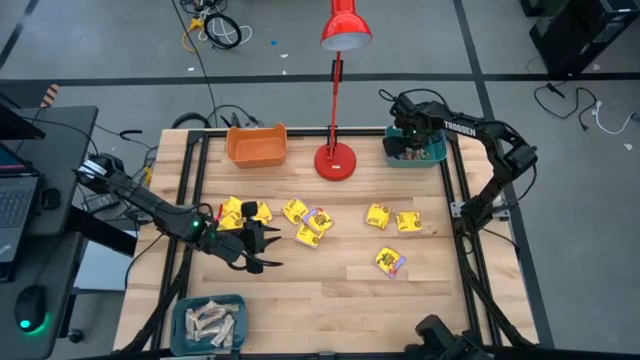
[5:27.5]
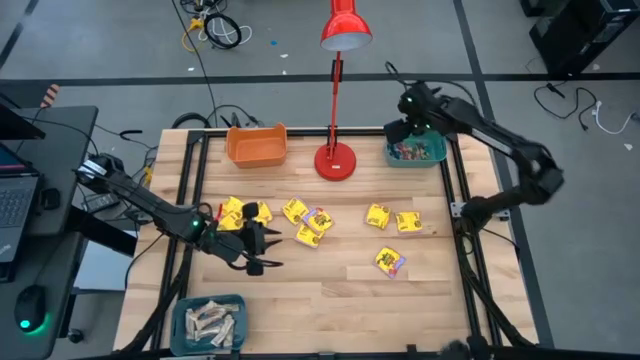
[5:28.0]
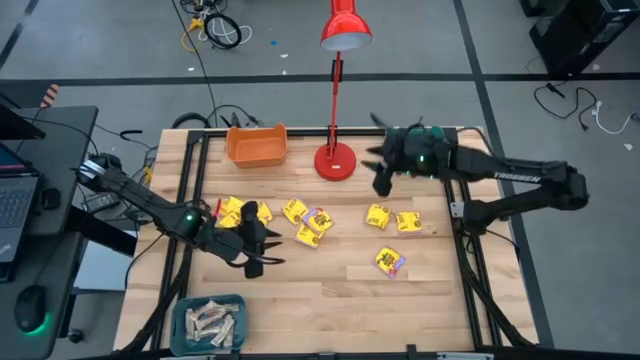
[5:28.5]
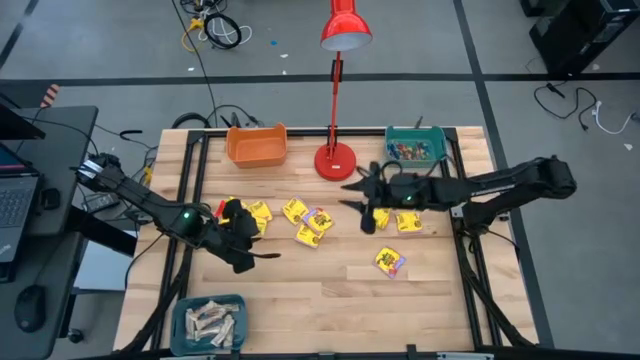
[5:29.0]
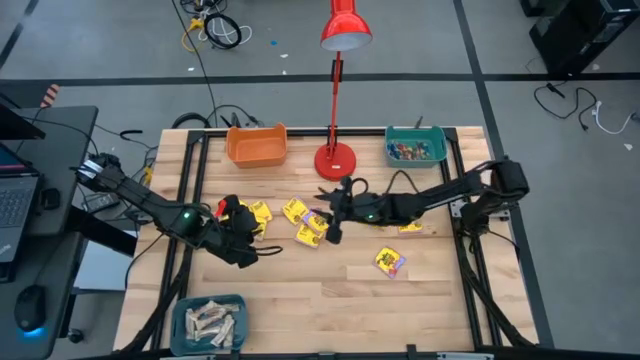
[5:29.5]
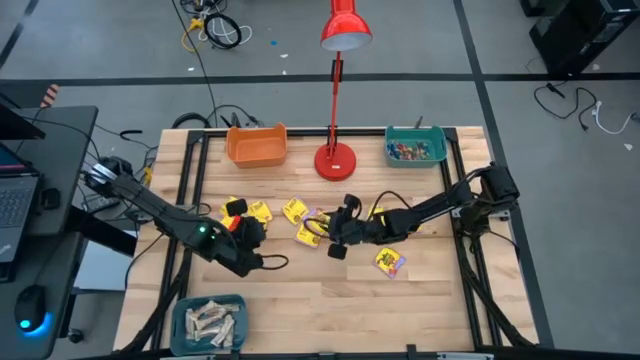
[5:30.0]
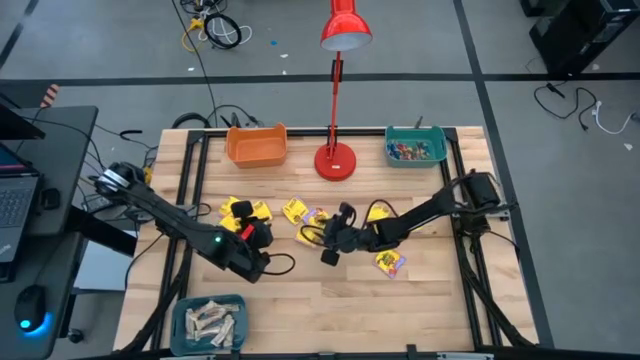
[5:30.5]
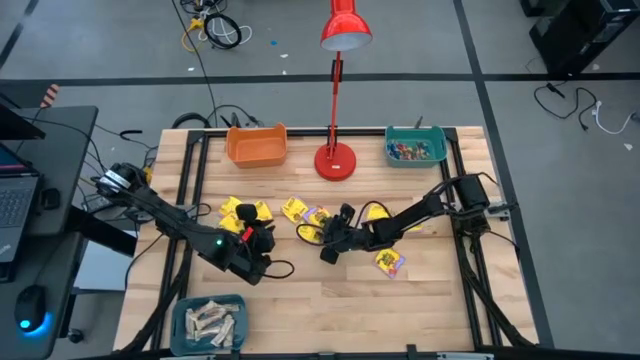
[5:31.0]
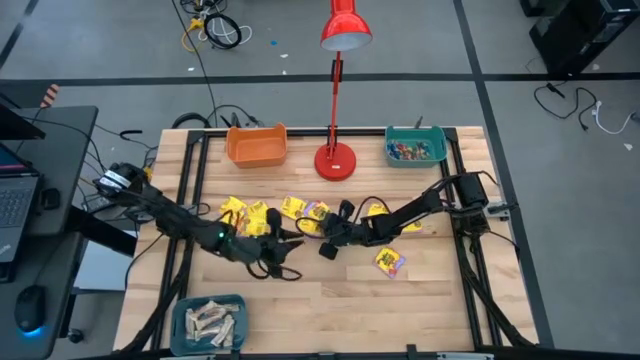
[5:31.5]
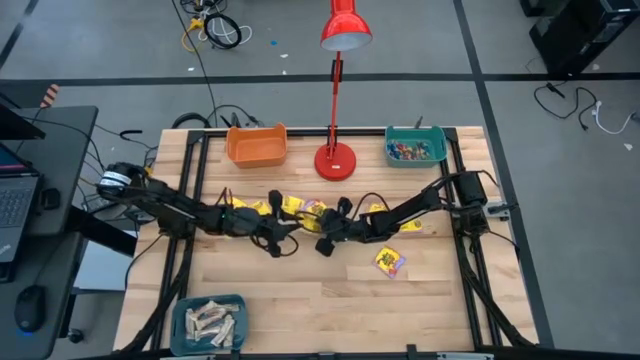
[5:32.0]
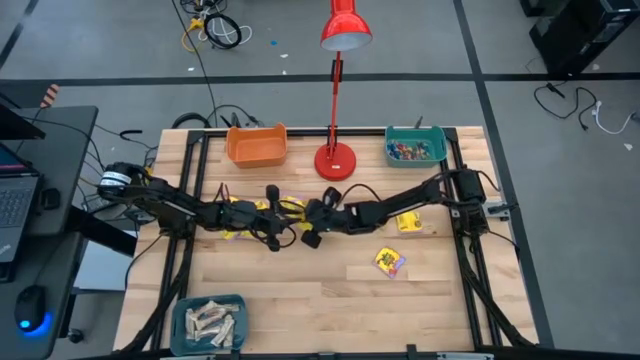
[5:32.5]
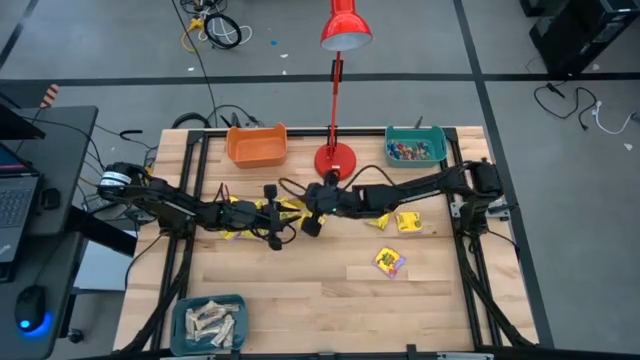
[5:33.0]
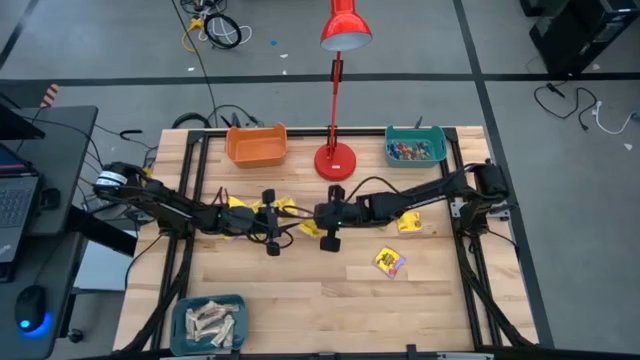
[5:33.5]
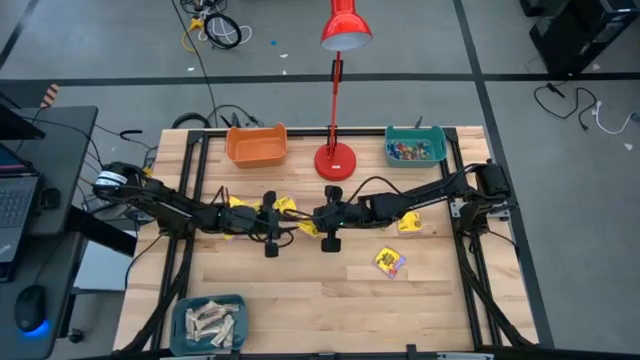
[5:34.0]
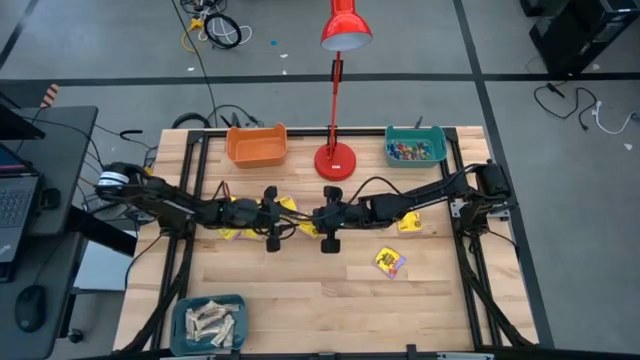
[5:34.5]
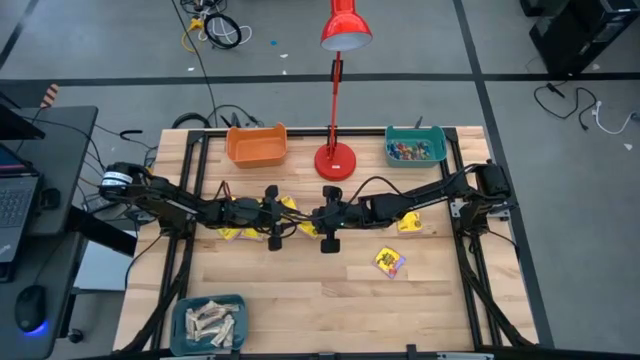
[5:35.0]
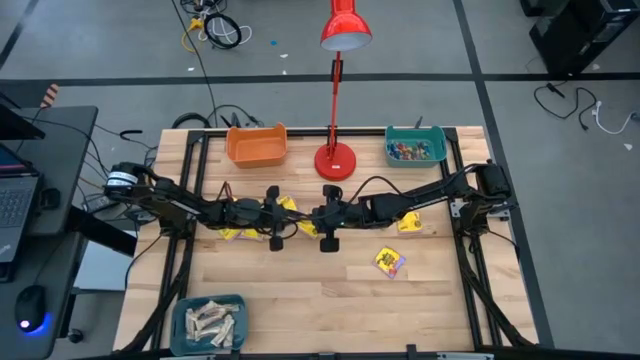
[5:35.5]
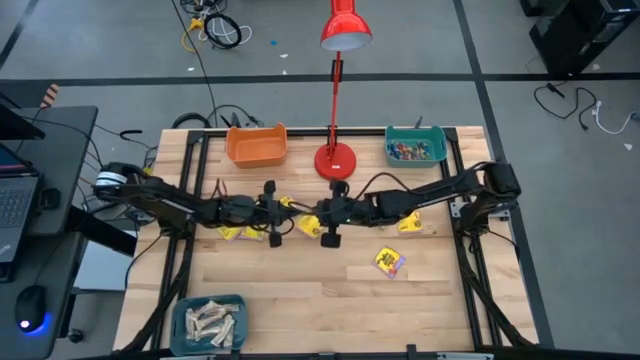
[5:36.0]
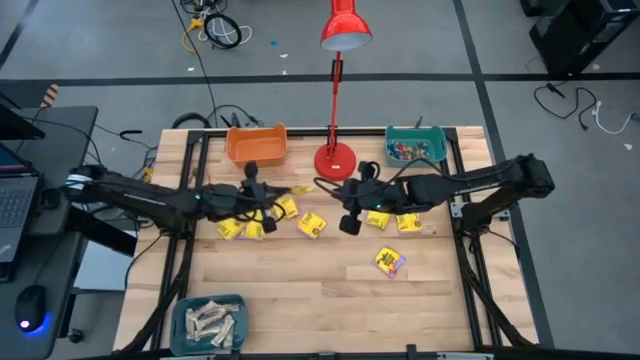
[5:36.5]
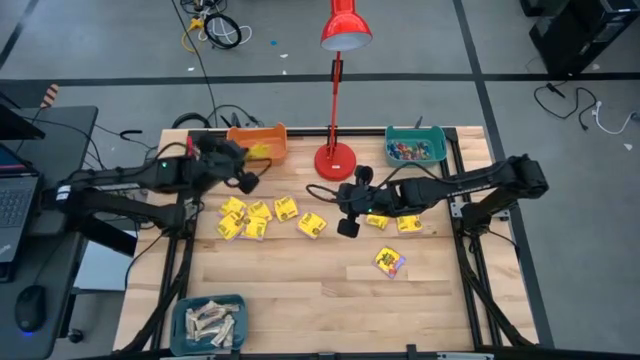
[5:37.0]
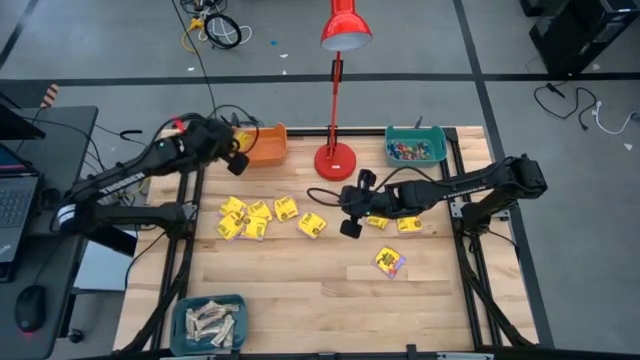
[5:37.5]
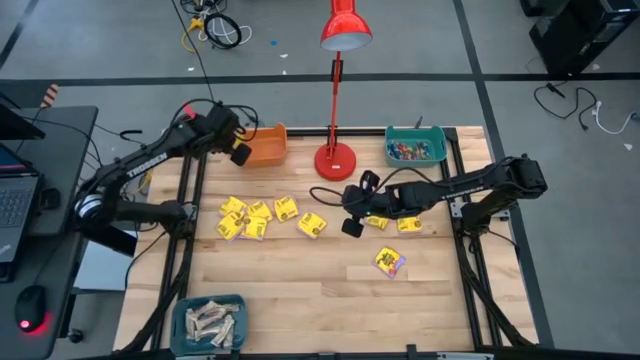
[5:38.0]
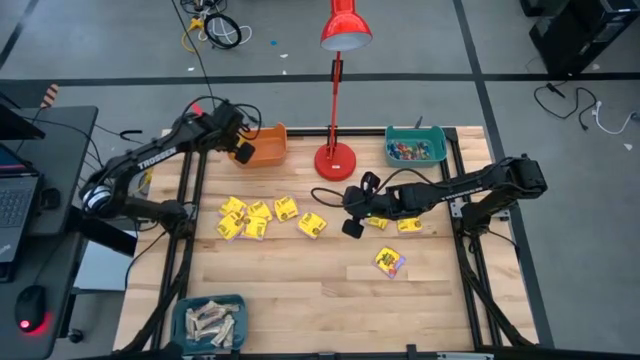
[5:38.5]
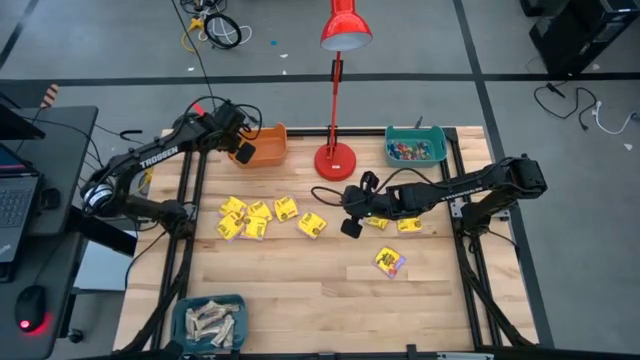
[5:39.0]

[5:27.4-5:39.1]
Task: Sort candy
Put the yellow candy into the orange bin

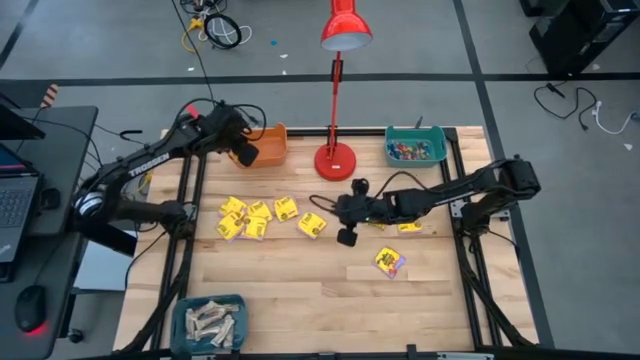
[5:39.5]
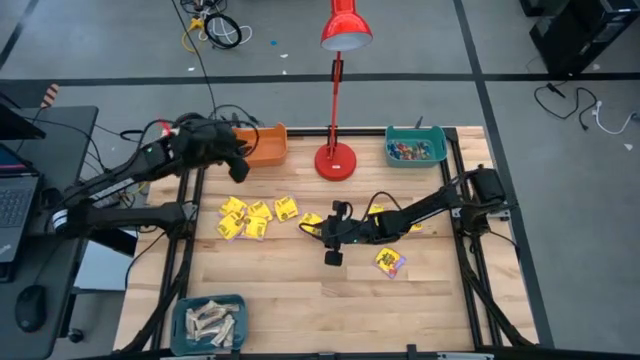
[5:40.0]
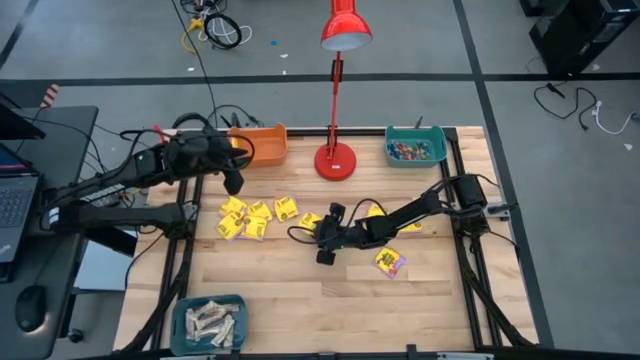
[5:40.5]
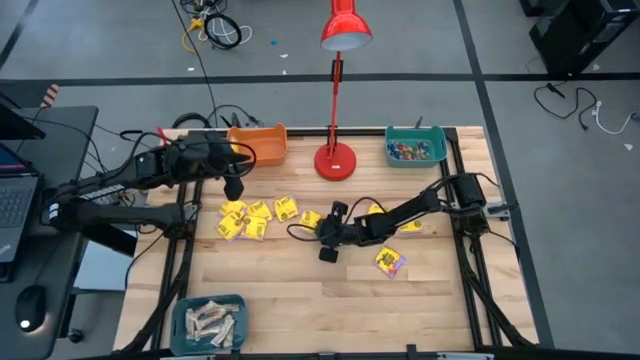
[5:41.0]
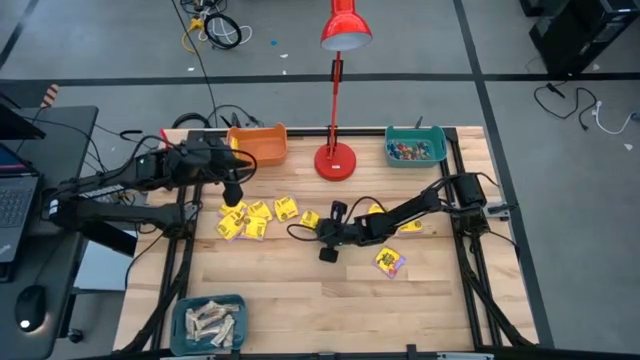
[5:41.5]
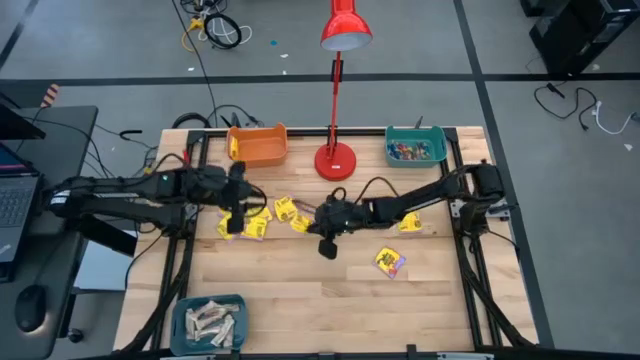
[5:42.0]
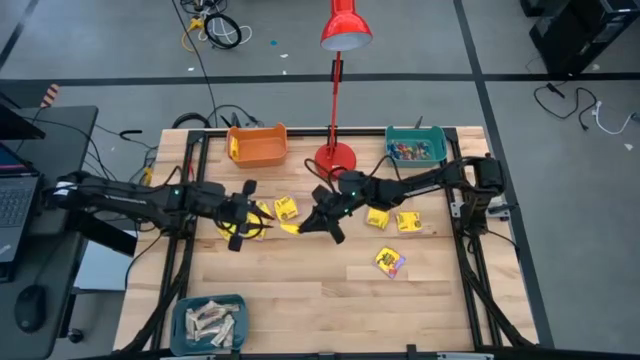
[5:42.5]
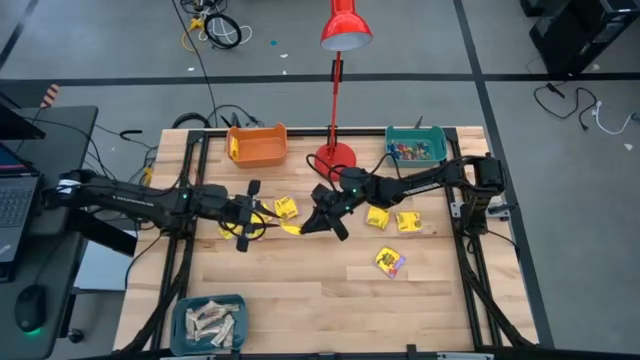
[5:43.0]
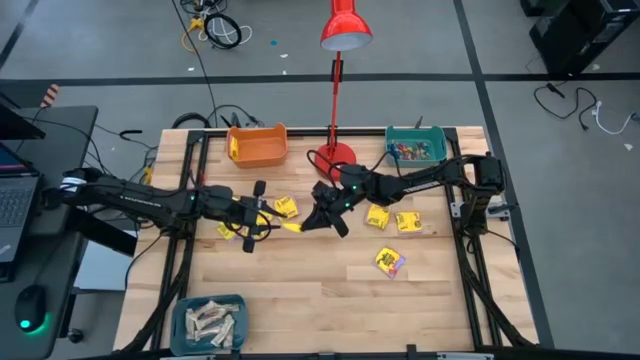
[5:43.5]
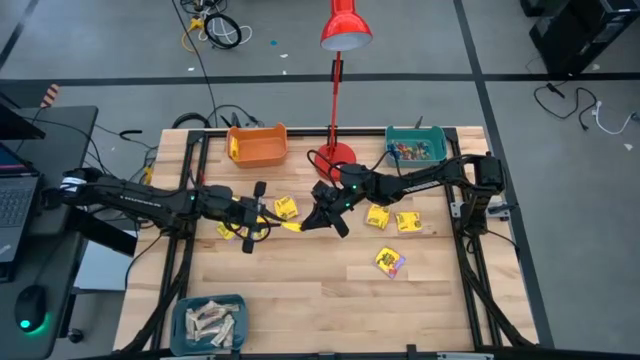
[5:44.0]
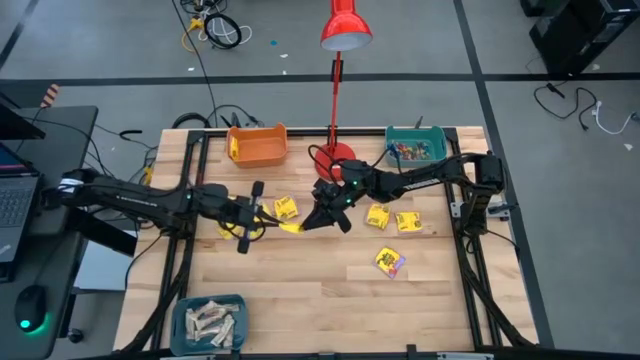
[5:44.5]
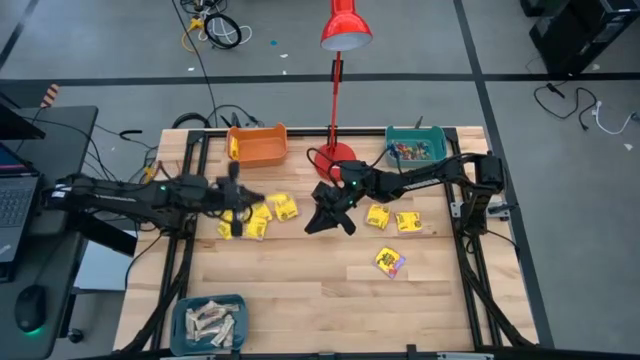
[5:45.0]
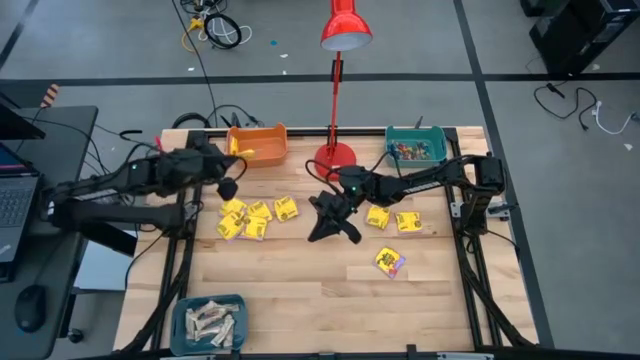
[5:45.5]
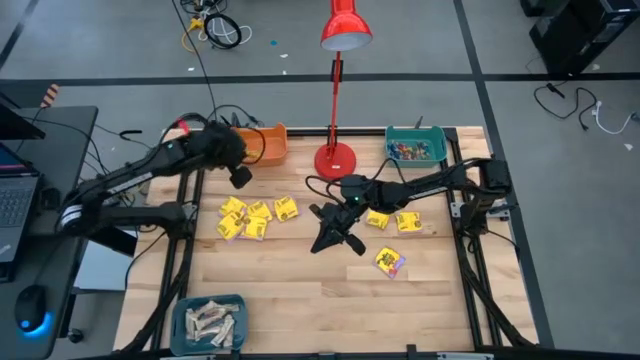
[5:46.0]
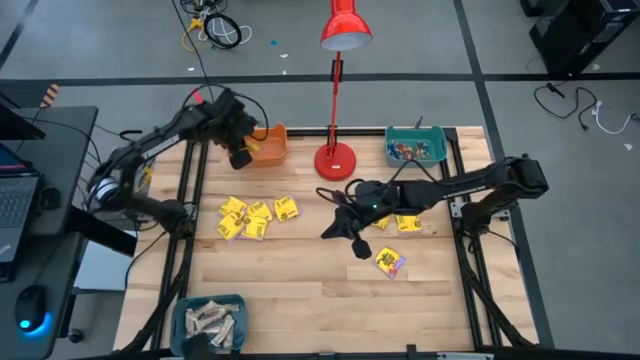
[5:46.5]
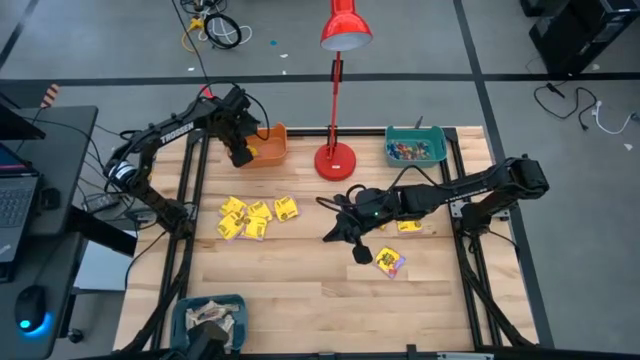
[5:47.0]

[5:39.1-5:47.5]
Put the yellow candy into the orange bin
